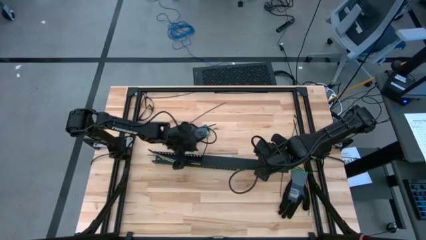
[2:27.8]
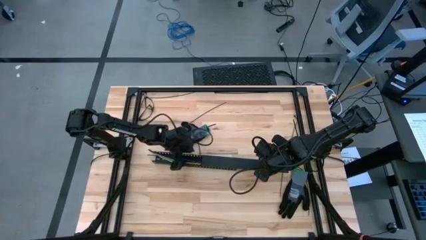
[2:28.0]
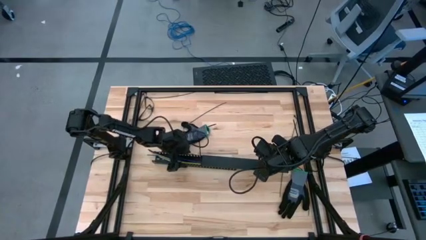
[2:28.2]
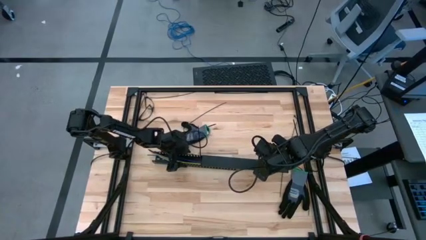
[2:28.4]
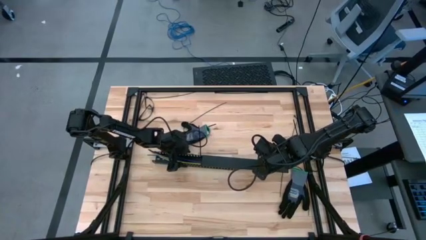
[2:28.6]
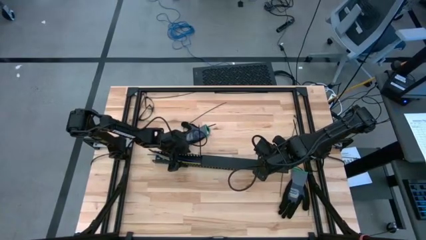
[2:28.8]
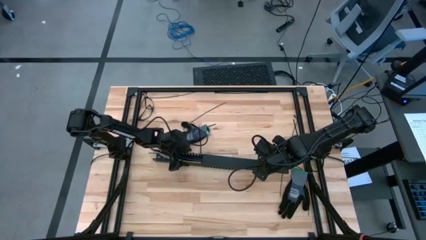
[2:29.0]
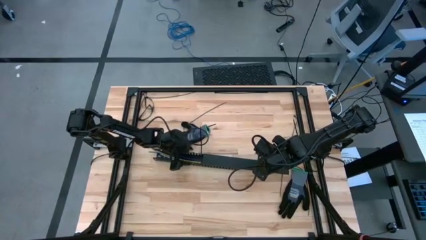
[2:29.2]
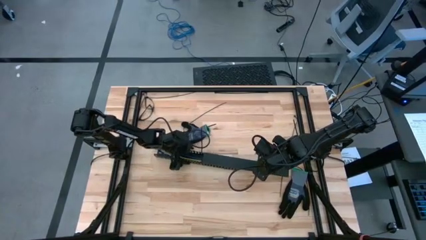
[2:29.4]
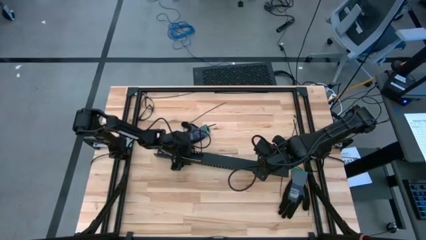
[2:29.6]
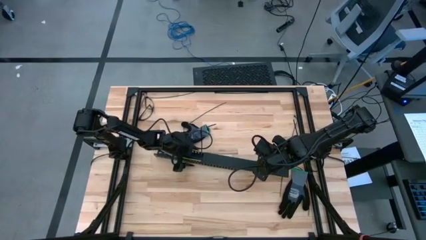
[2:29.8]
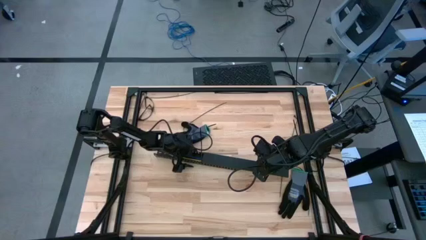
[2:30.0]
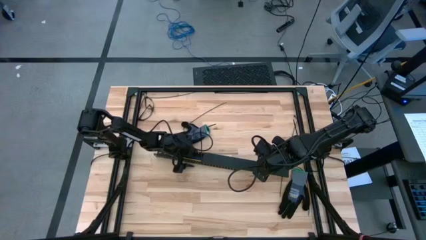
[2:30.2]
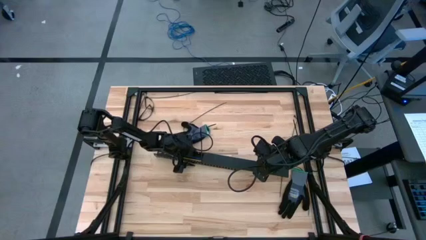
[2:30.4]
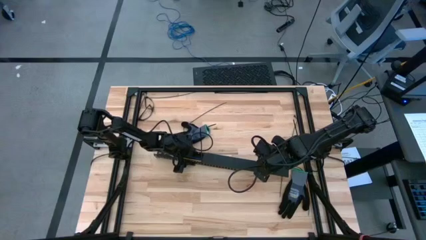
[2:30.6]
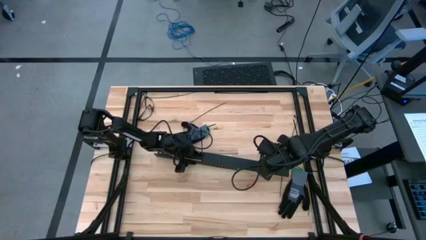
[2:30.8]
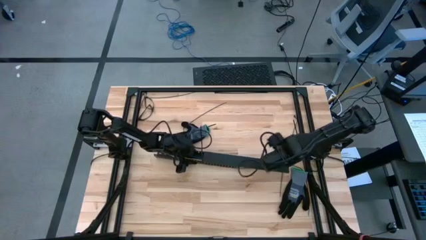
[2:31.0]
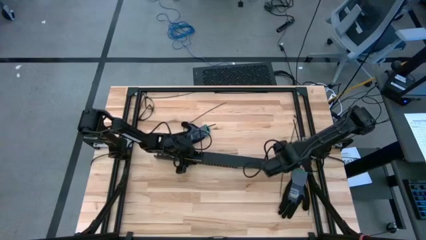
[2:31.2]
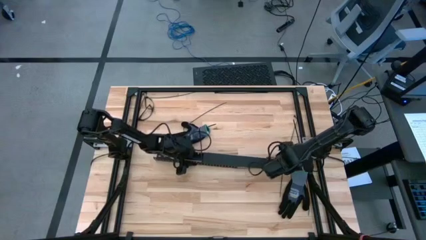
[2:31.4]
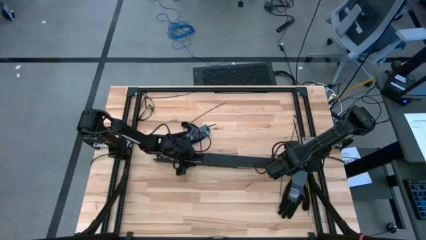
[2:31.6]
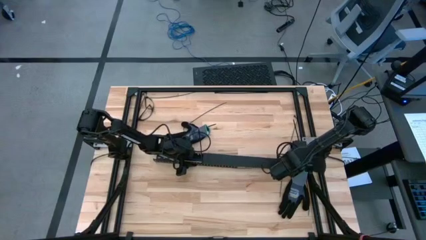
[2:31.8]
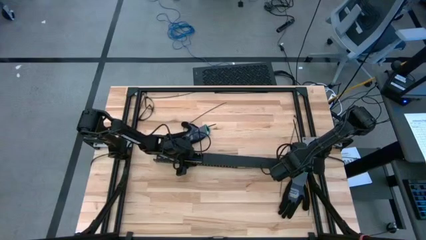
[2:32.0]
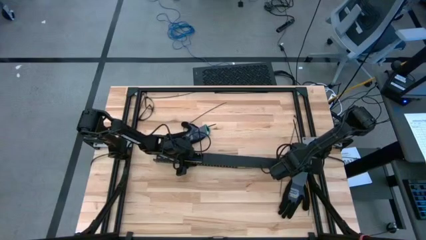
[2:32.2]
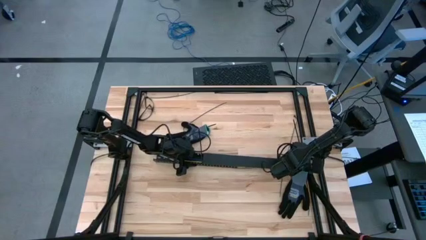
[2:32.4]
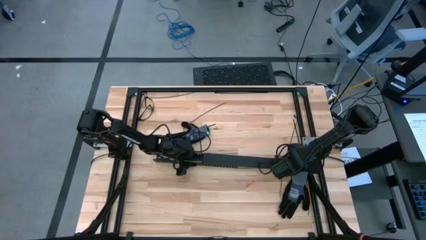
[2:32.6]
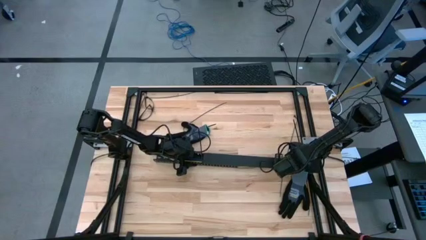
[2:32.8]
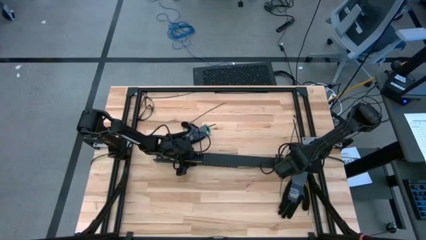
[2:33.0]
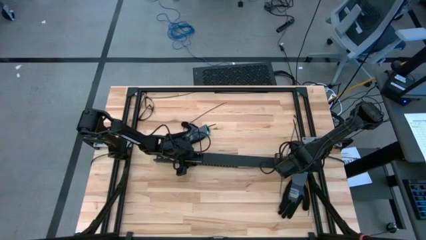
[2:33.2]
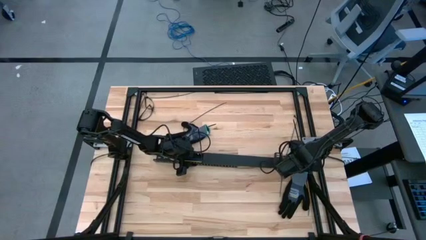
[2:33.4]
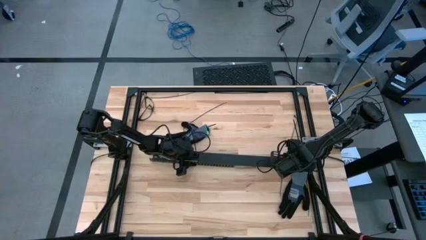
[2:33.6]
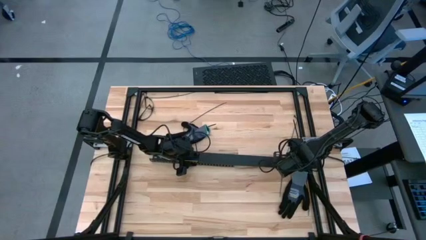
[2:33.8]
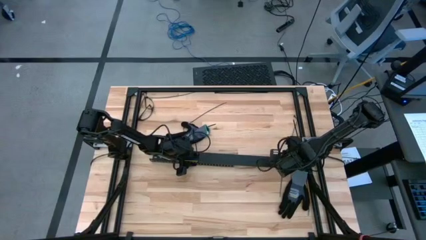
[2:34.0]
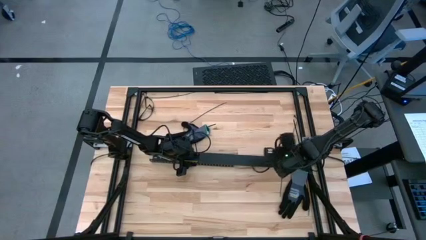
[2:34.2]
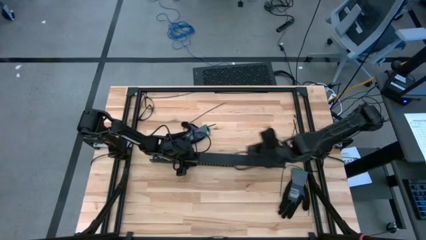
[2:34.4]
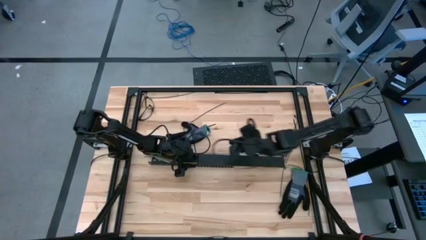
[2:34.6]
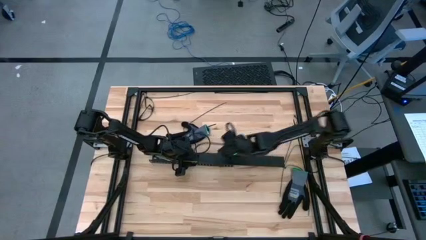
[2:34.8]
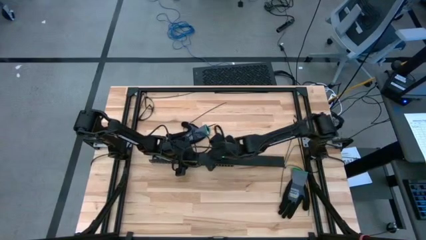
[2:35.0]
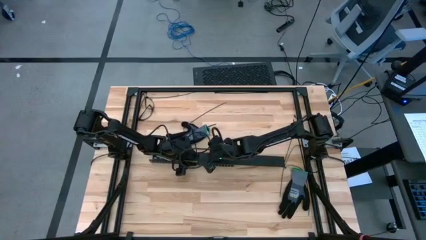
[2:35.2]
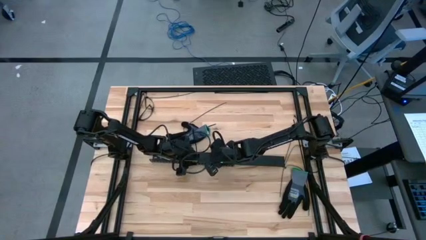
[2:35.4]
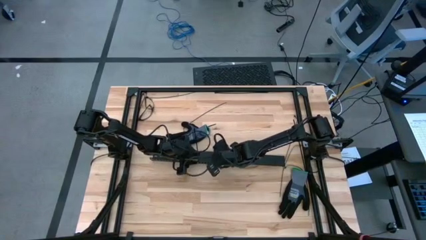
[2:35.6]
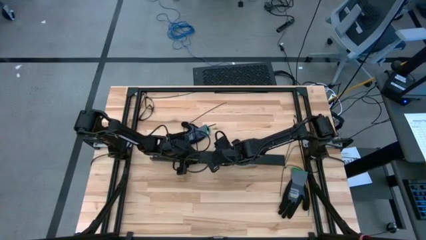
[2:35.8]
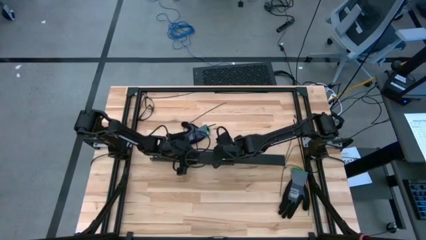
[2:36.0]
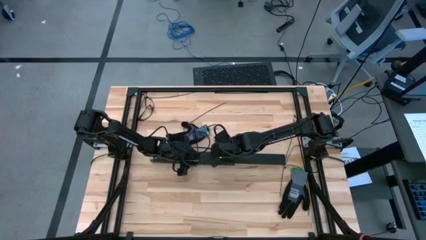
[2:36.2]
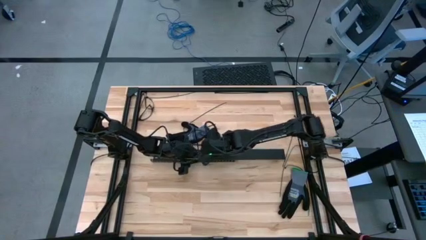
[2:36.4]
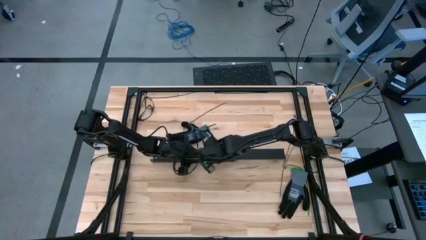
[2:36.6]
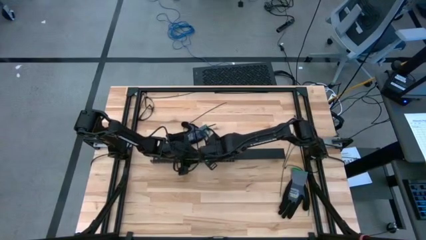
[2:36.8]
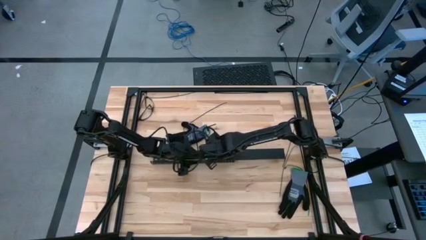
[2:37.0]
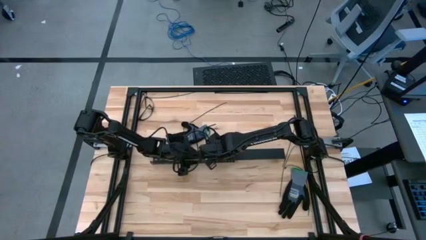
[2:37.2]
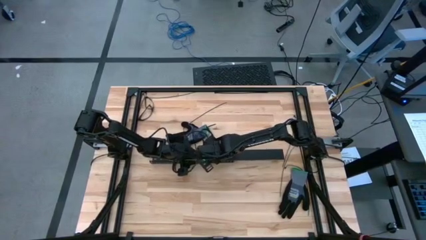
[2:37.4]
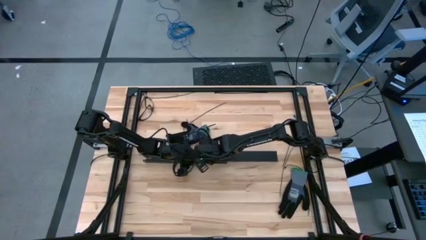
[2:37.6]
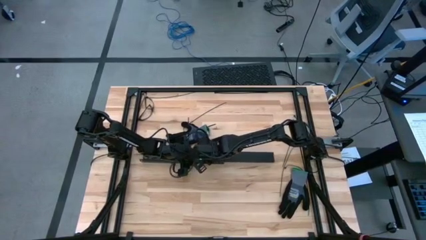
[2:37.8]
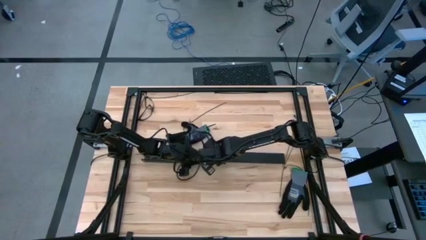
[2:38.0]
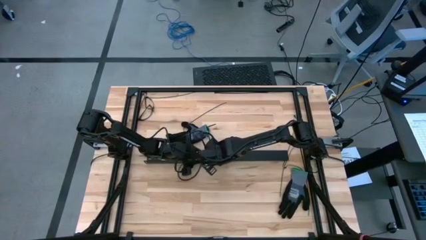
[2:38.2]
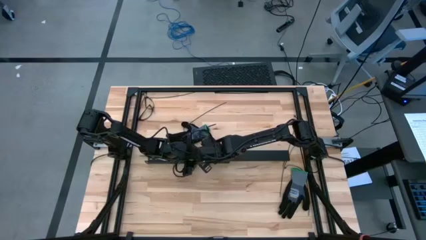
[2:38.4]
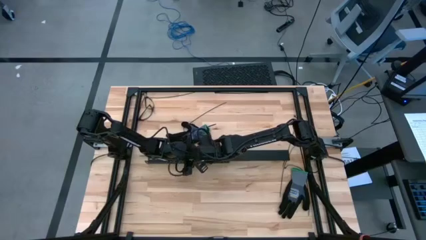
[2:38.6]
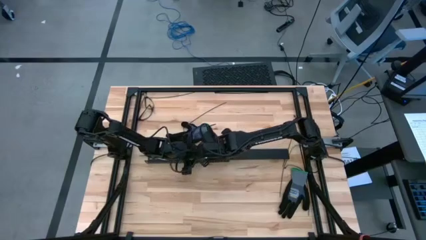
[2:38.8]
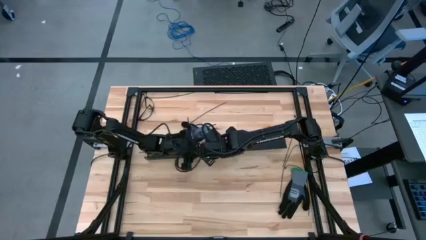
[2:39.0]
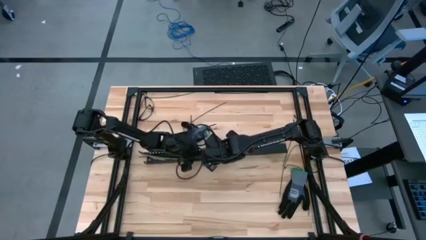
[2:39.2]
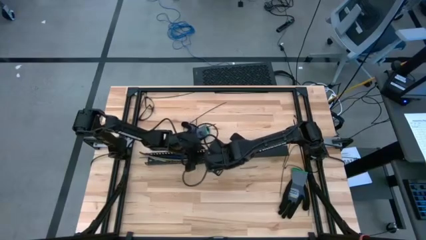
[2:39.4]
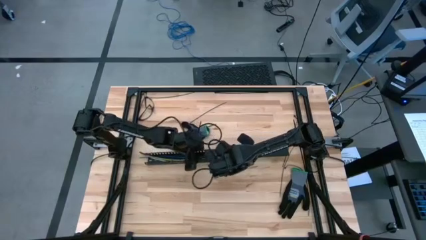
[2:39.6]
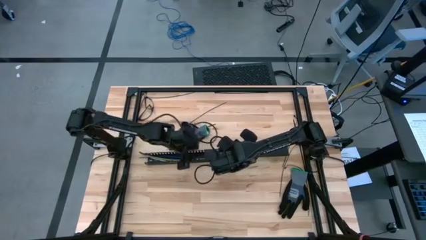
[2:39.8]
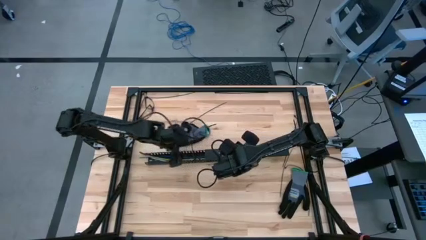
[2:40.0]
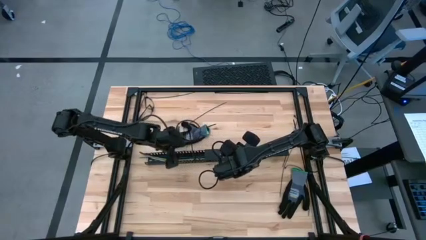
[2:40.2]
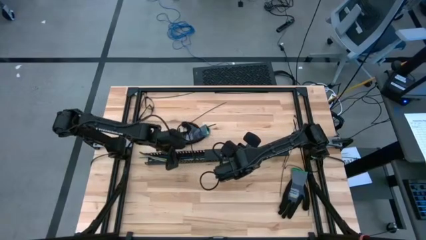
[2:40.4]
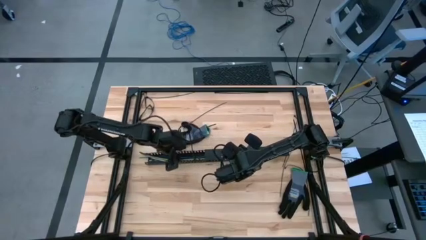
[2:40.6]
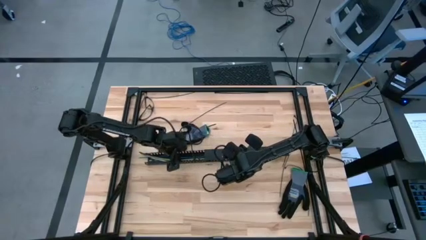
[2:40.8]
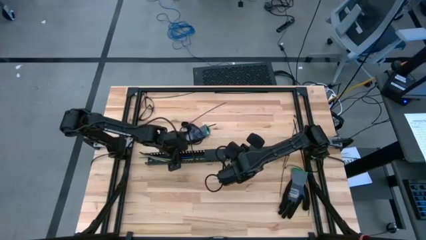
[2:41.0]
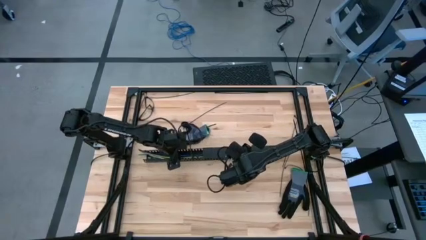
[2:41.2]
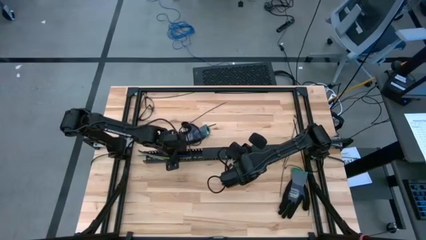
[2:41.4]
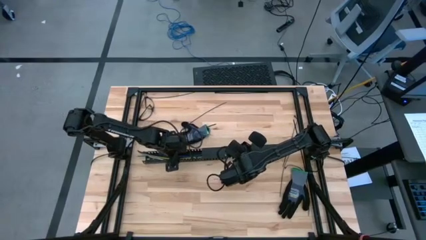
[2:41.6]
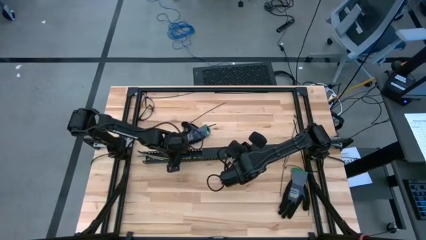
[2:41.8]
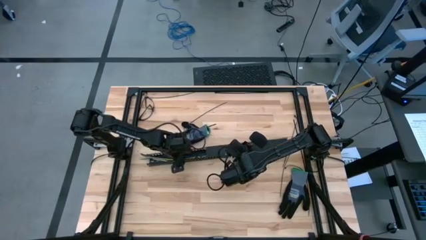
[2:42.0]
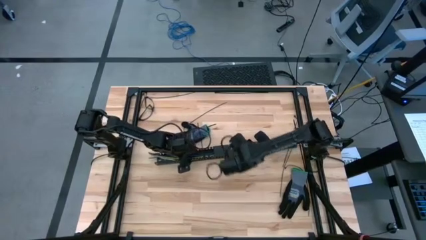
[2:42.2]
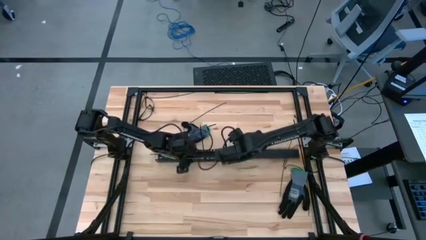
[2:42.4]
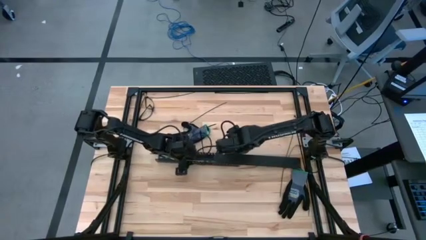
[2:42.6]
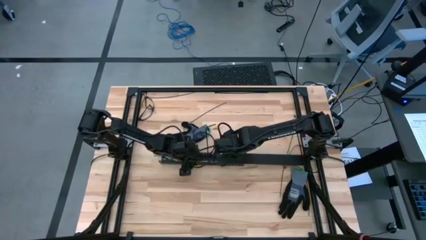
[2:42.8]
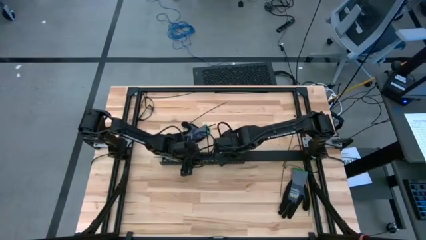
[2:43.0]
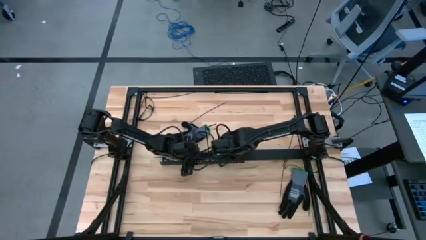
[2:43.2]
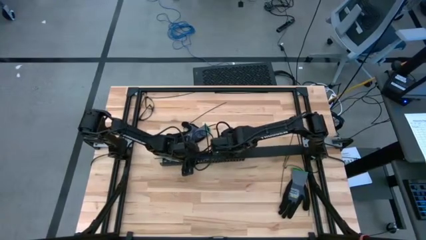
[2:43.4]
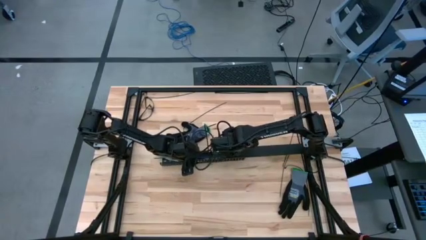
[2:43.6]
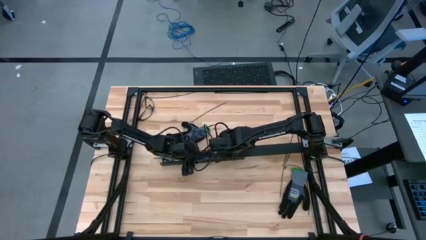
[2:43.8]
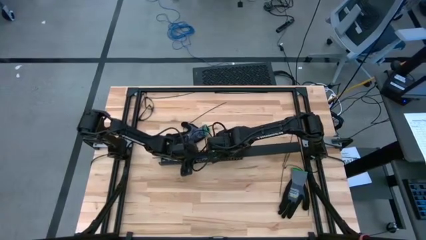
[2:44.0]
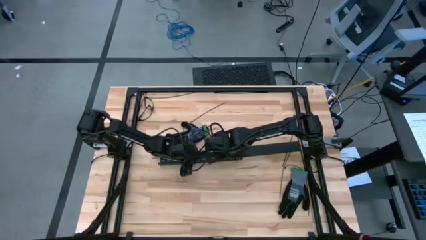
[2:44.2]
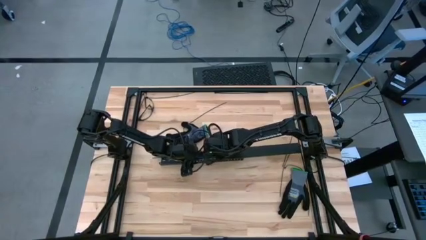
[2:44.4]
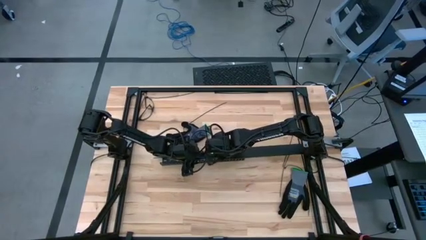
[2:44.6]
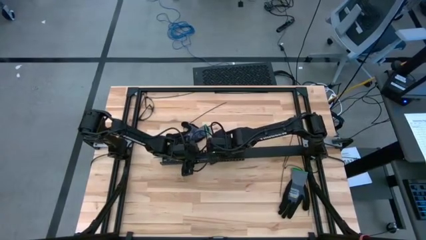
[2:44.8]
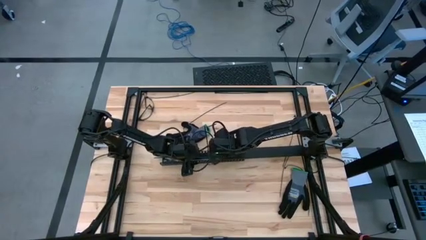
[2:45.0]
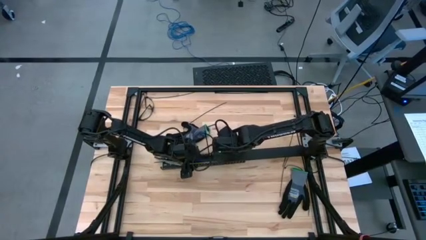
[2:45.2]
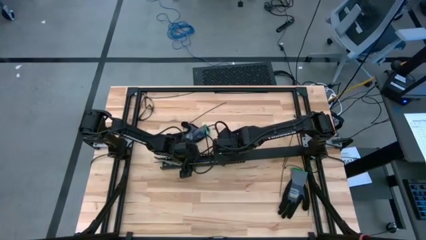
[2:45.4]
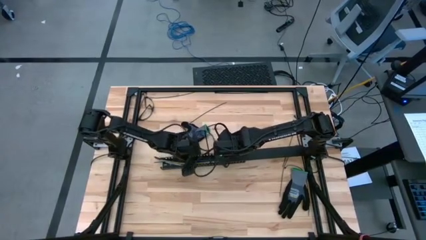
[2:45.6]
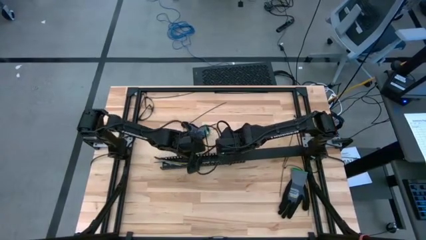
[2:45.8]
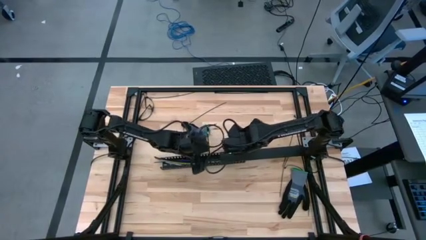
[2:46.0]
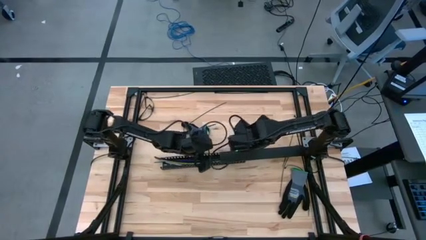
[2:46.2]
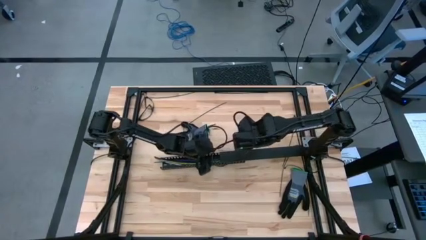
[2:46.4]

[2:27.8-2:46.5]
Task: Ziptie cables
Close the black cable duct lid
